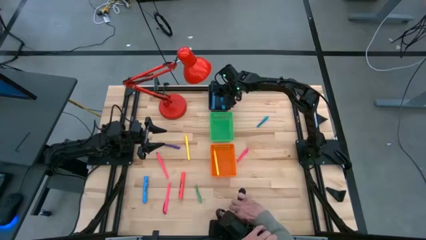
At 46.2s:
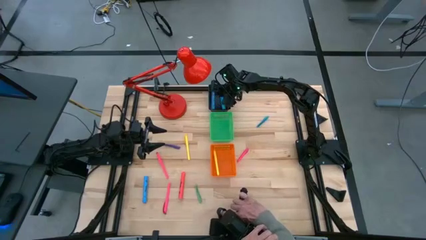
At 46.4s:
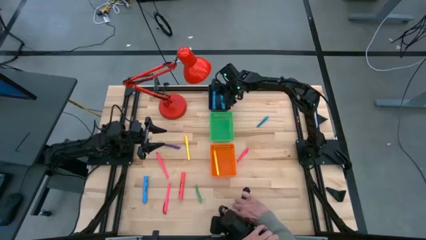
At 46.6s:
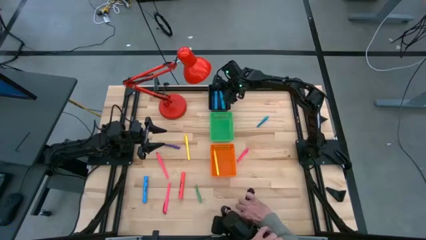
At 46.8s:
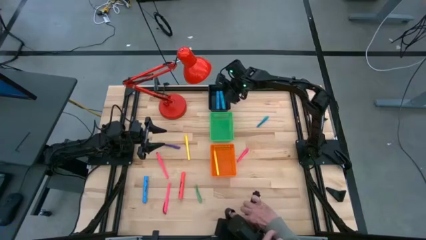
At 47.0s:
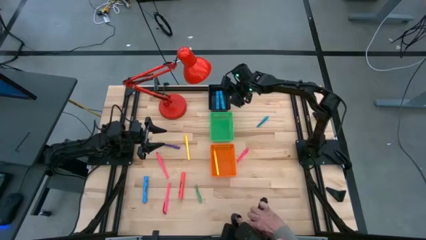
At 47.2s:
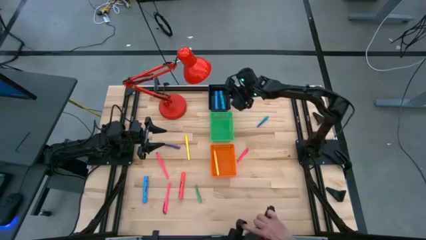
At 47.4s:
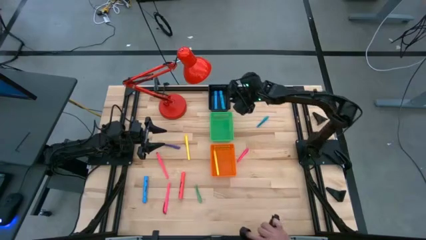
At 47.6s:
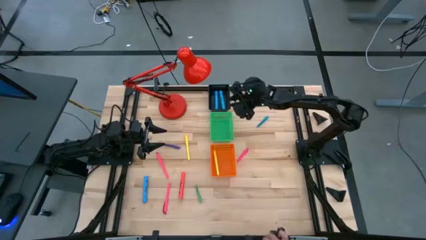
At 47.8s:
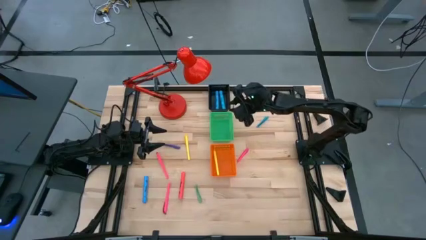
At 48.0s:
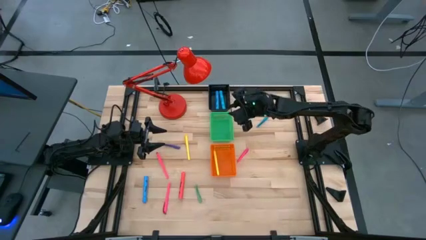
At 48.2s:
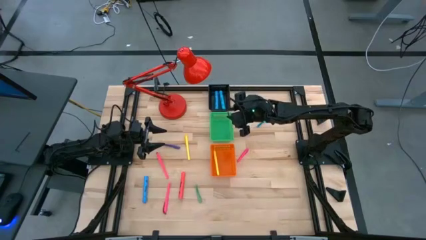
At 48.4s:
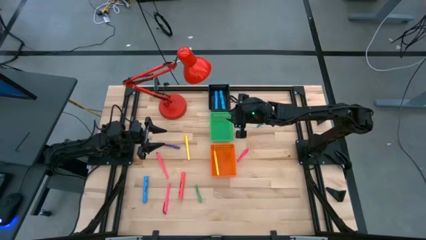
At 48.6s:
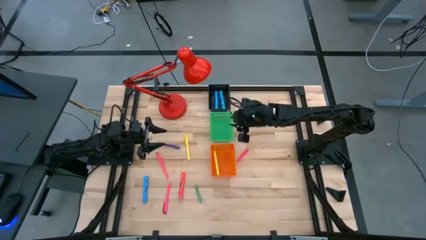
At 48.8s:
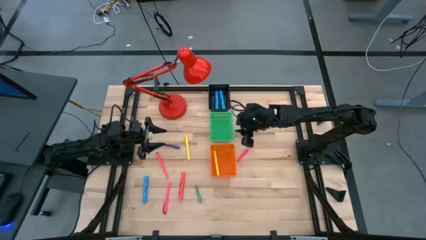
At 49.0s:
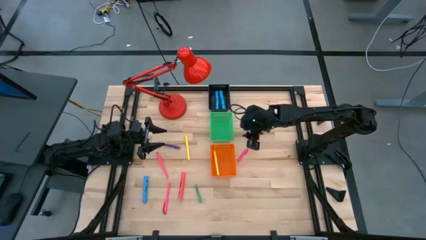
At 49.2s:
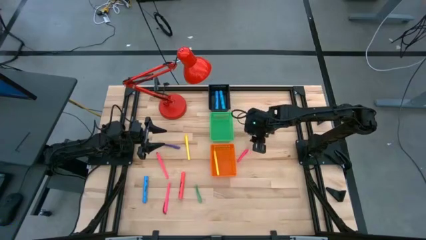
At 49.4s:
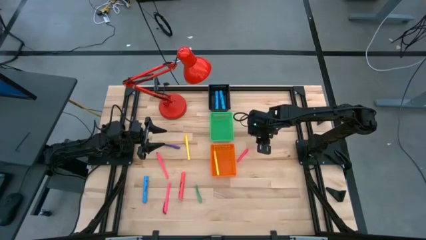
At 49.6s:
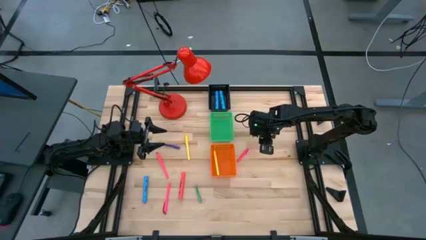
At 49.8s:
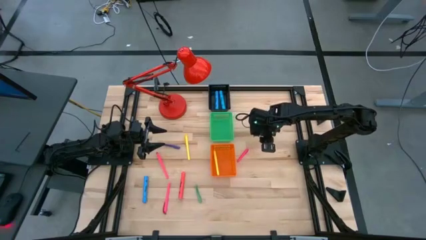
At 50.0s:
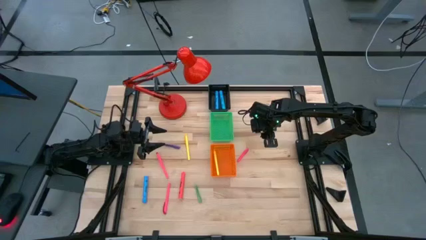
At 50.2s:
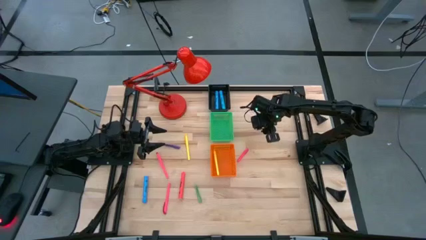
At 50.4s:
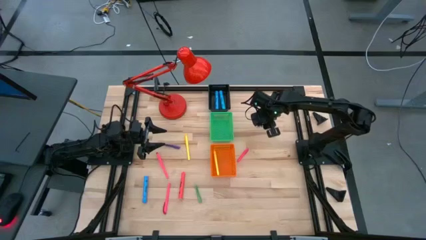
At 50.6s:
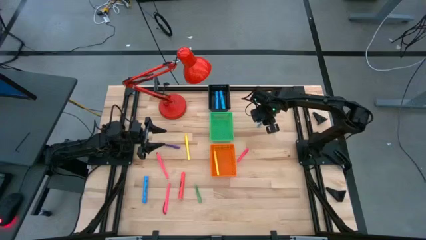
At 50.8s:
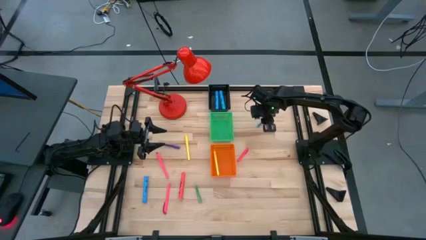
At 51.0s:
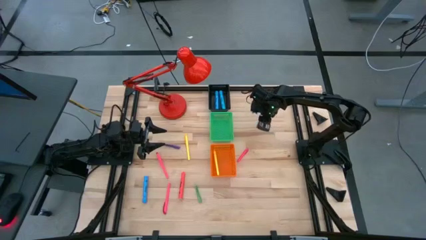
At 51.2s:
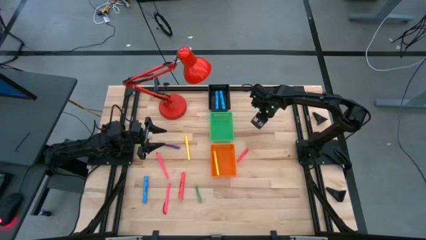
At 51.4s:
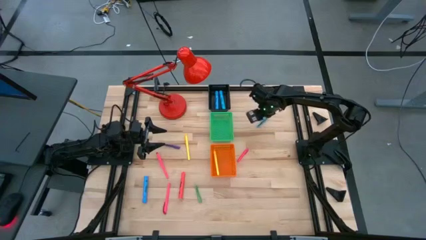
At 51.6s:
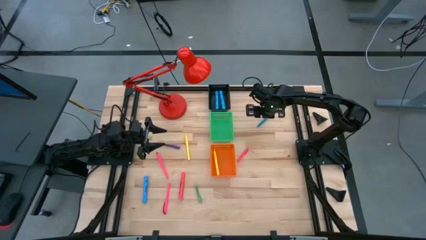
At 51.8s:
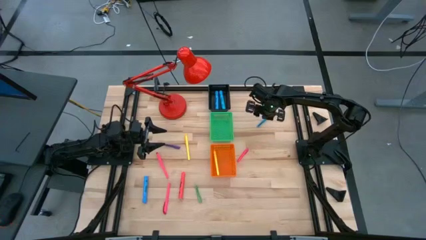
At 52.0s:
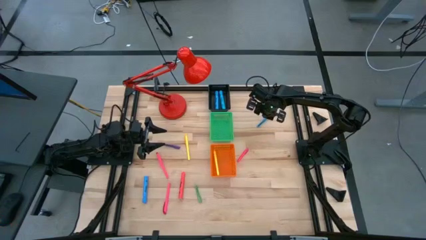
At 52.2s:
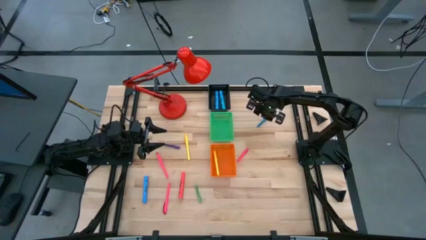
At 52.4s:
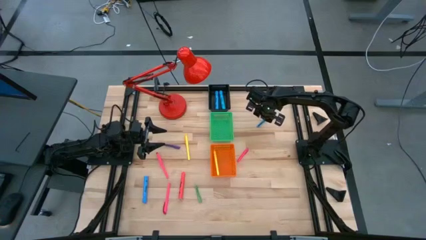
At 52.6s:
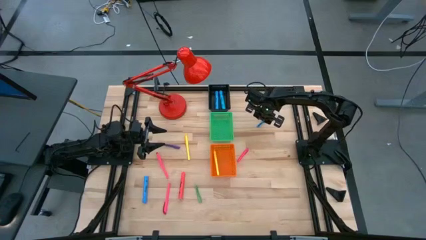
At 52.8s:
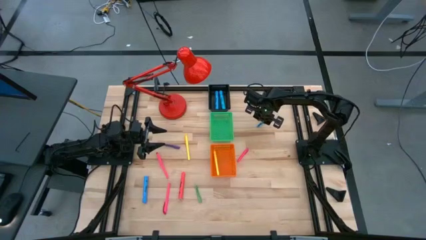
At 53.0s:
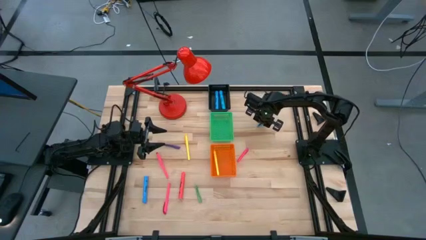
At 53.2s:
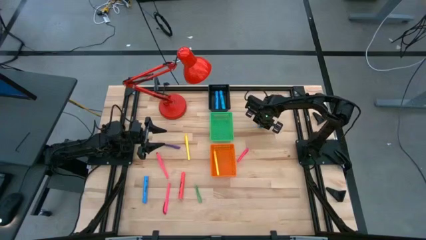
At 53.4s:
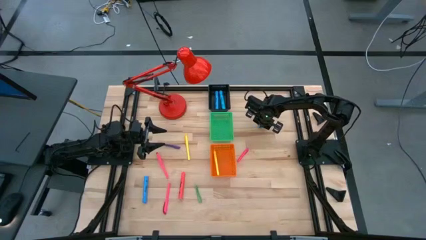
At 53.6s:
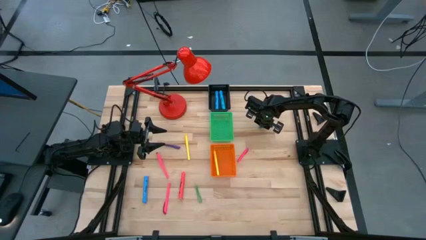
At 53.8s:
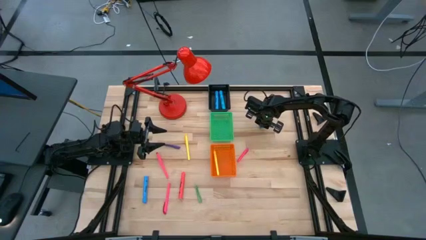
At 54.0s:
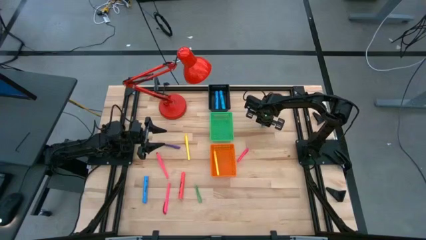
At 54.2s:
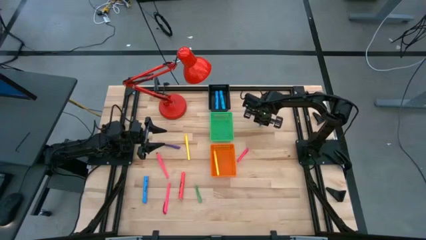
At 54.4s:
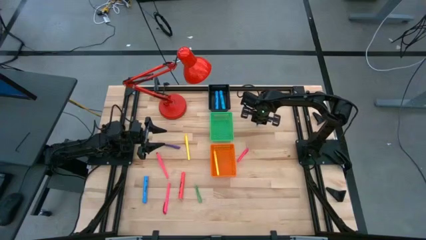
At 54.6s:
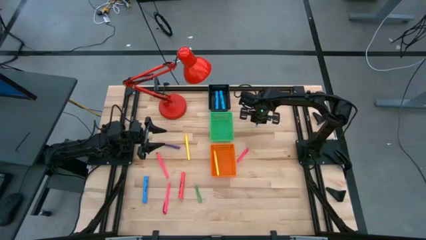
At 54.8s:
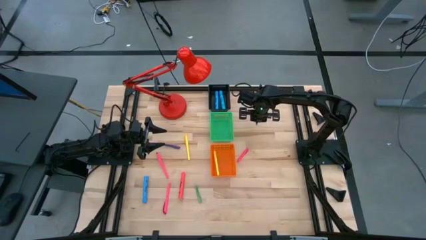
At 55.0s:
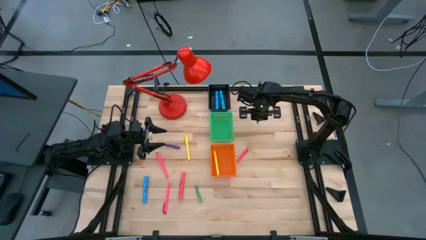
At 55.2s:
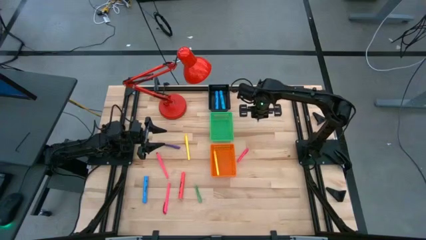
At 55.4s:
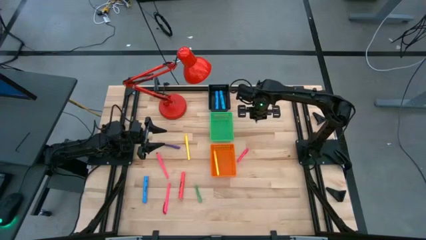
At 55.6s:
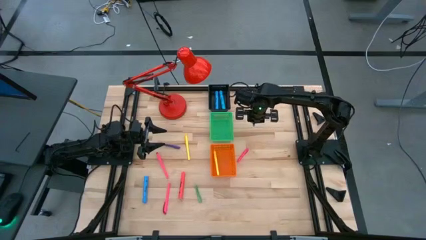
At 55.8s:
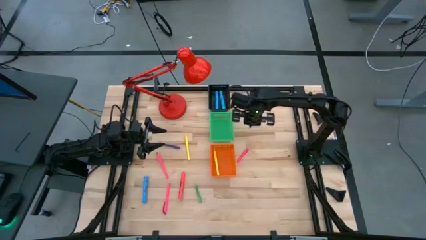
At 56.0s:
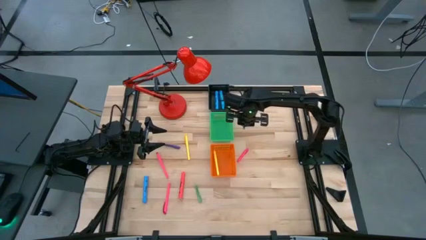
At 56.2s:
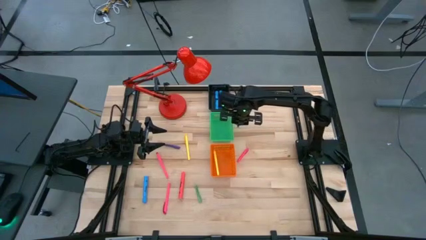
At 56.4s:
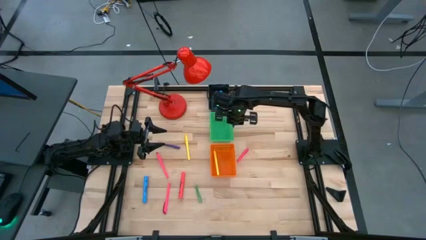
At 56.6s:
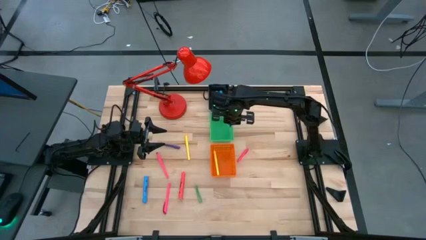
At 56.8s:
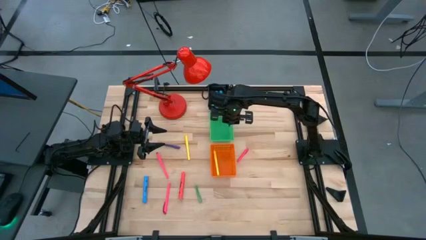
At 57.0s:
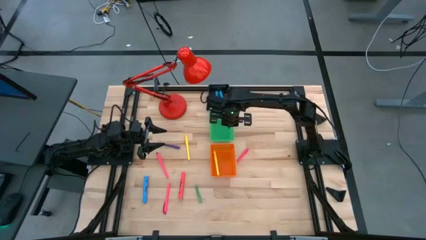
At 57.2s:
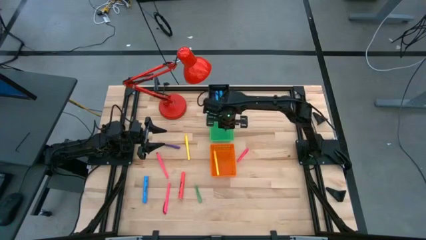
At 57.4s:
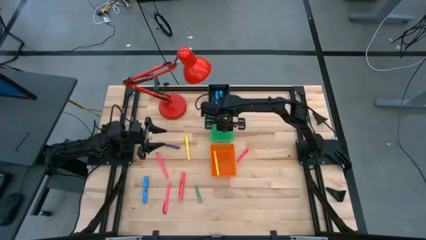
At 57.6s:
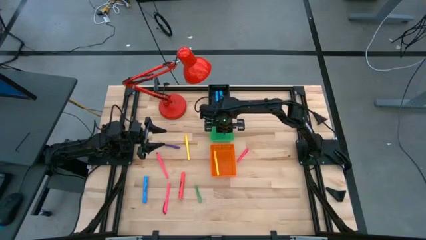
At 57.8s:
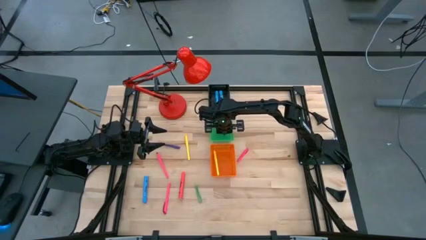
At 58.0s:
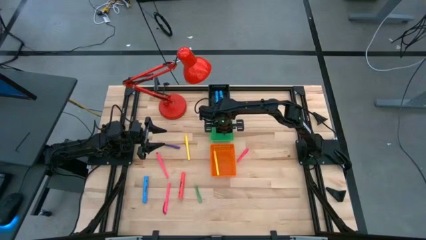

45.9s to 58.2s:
Task: Pick & Place Markers
Put the blue marker into the green bin
